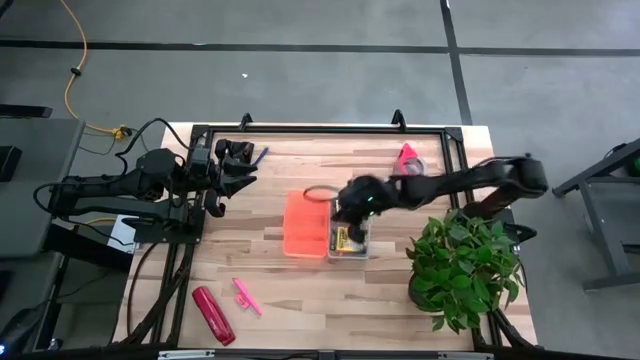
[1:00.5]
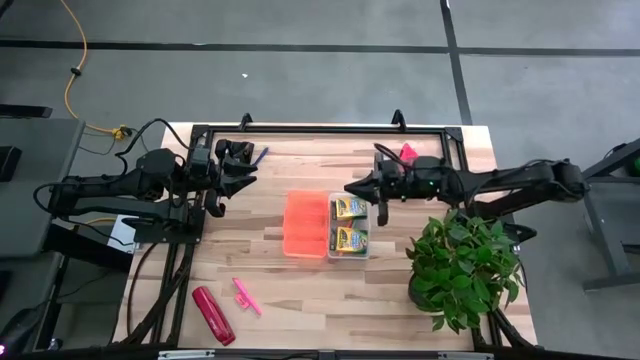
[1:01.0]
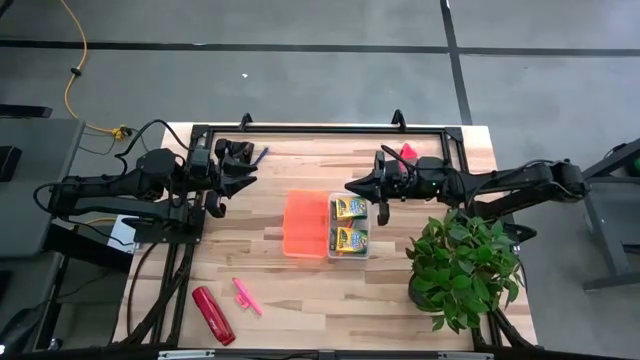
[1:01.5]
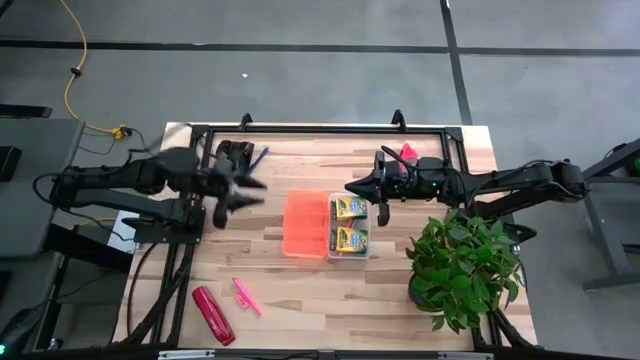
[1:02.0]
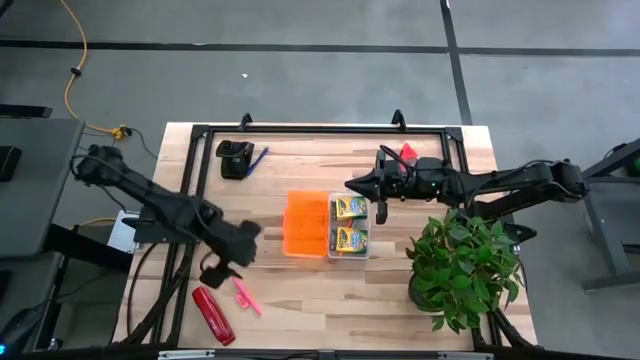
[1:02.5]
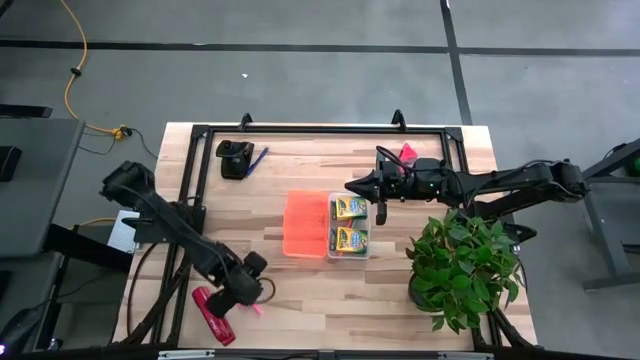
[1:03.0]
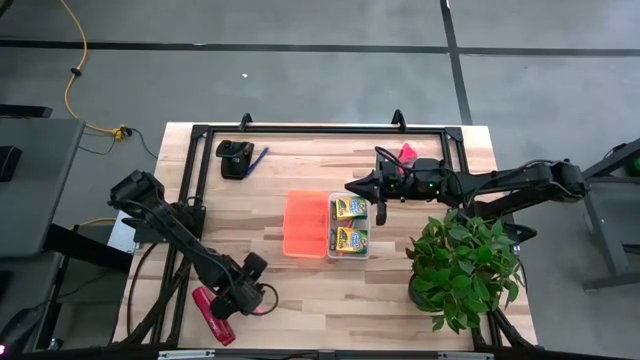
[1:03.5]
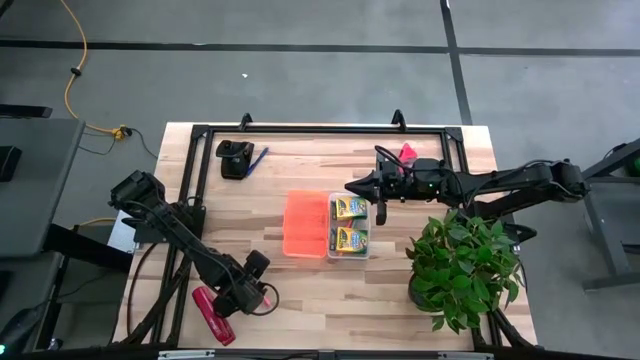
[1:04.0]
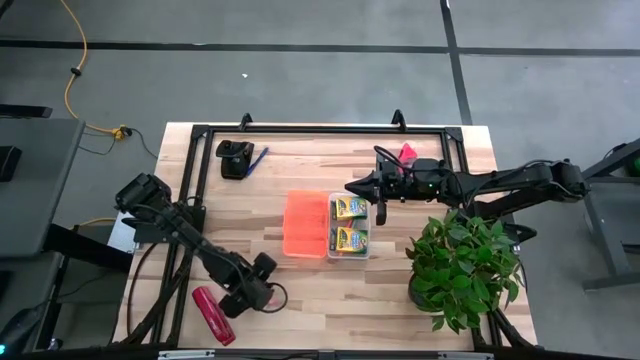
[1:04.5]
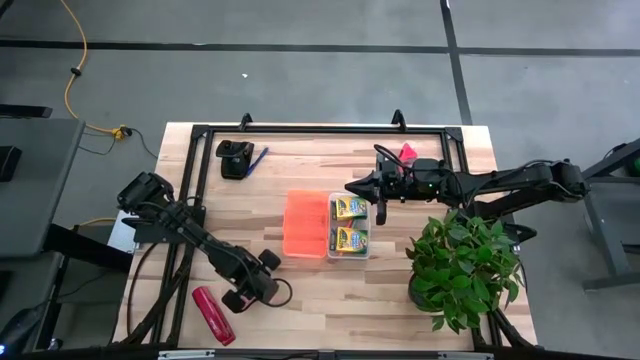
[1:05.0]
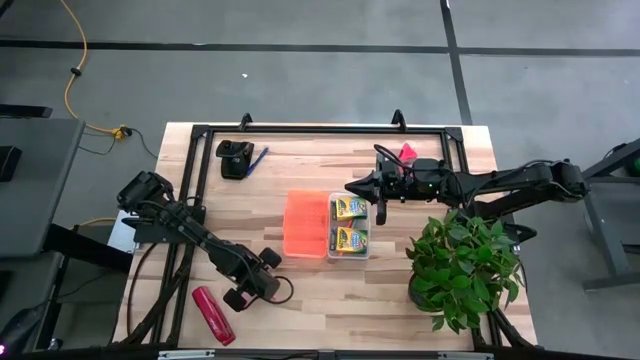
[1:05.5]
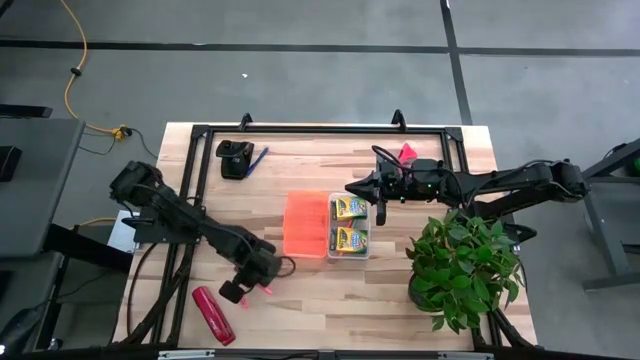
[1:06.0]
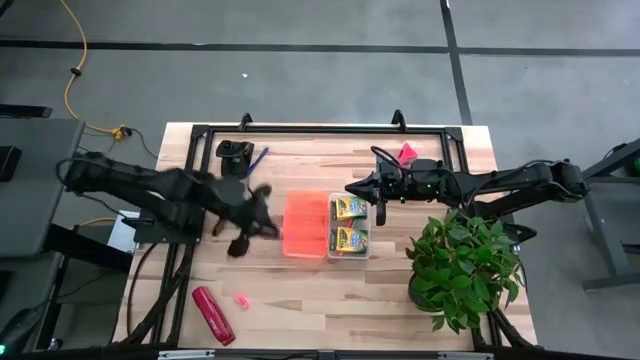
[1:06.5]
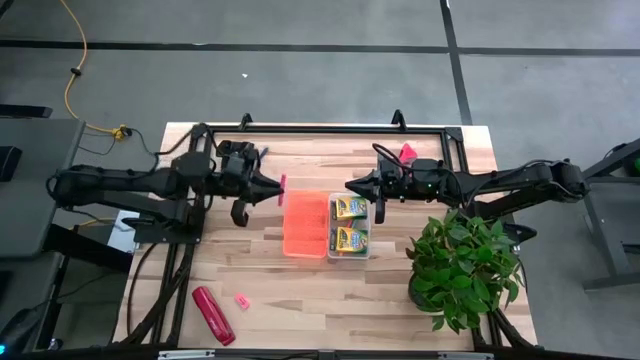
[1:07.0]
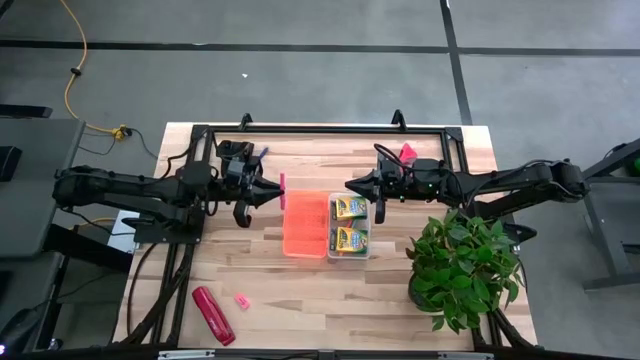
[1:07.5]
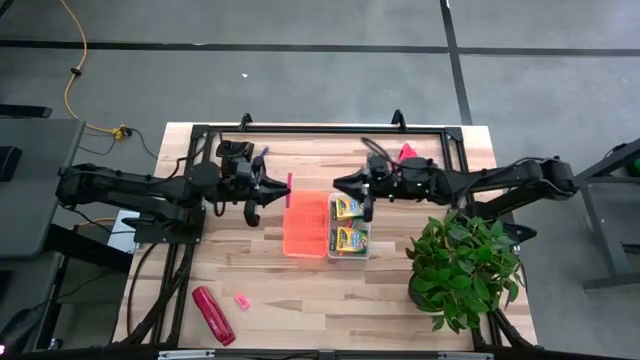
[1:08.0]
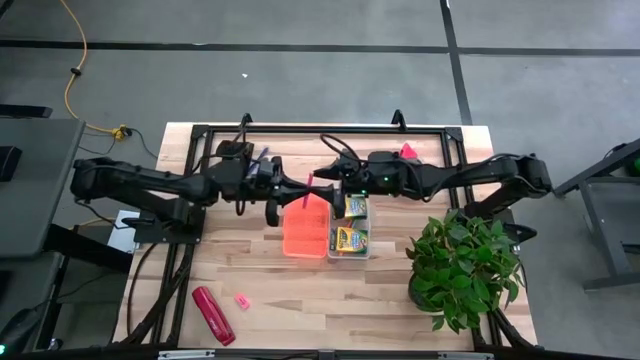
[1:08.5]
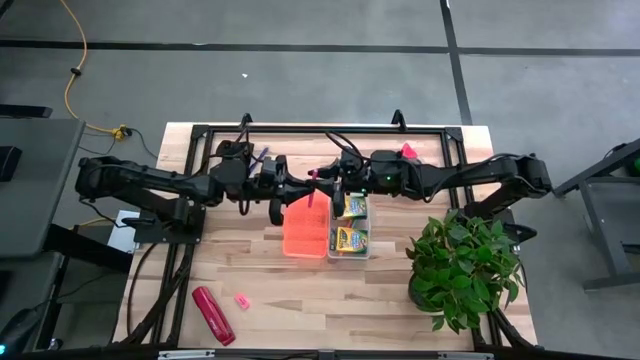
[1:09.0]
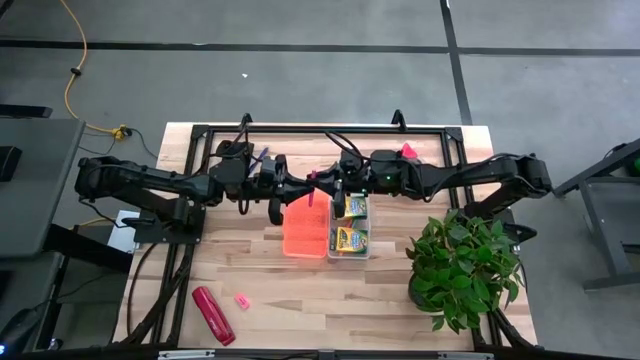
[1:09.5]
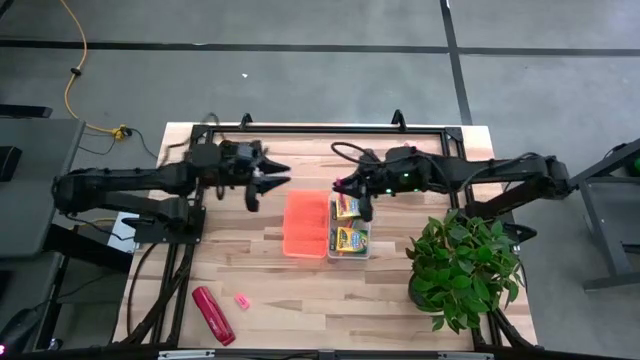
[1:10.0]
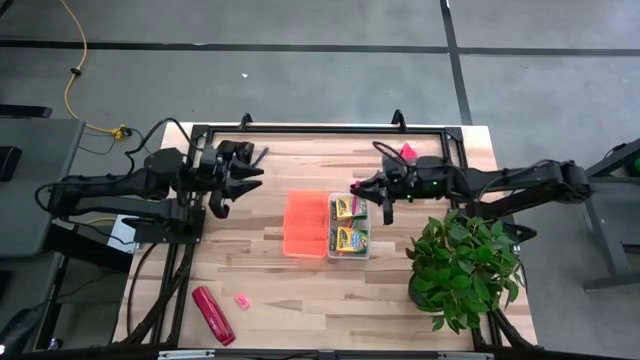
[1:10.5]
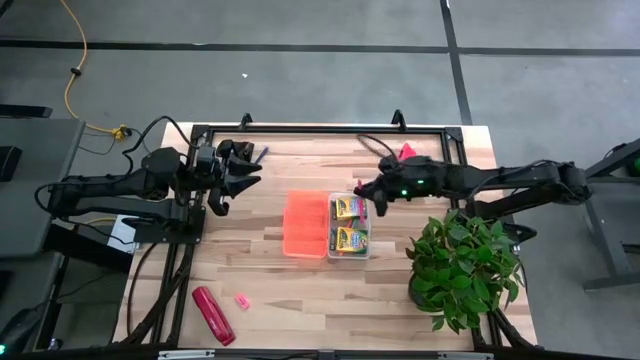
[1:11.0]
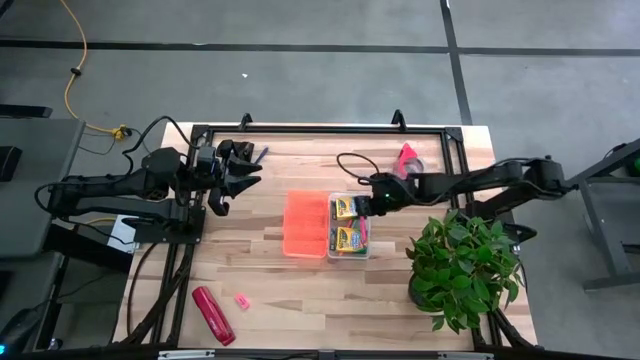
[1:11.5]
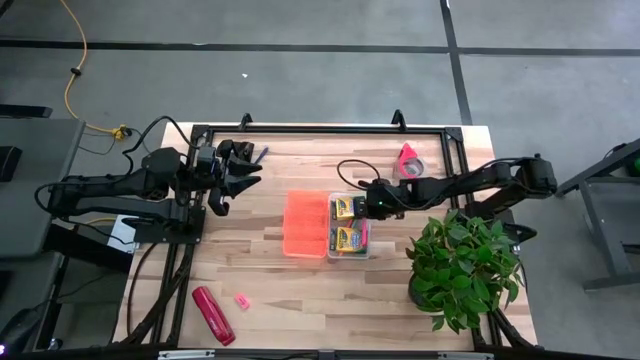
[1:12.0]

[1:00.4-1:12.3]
Task: Pack school essentials
Put the pink pen in the supply box

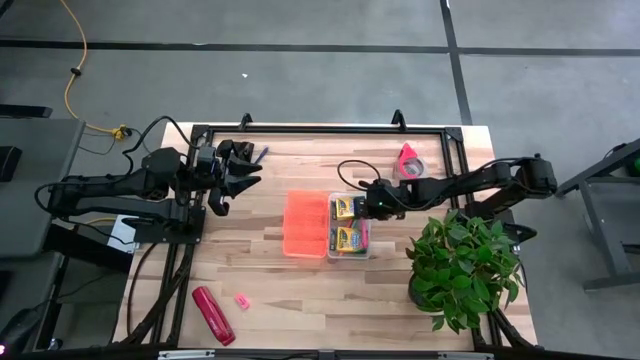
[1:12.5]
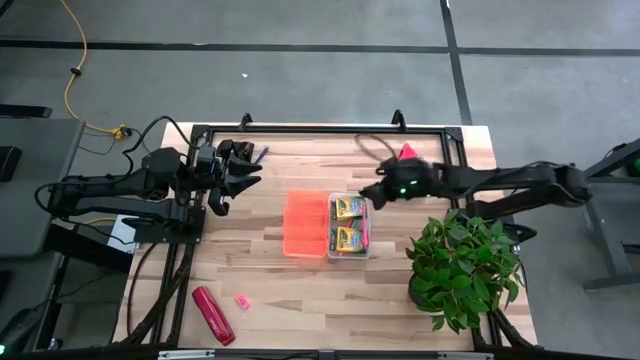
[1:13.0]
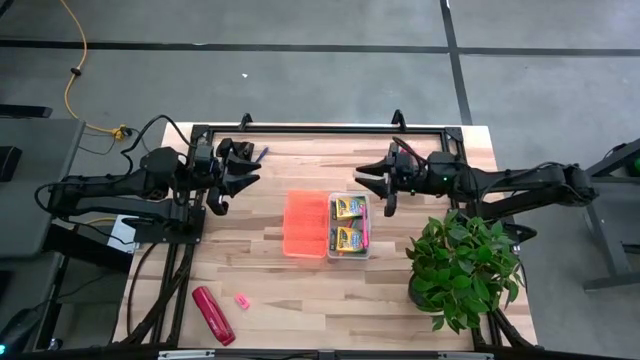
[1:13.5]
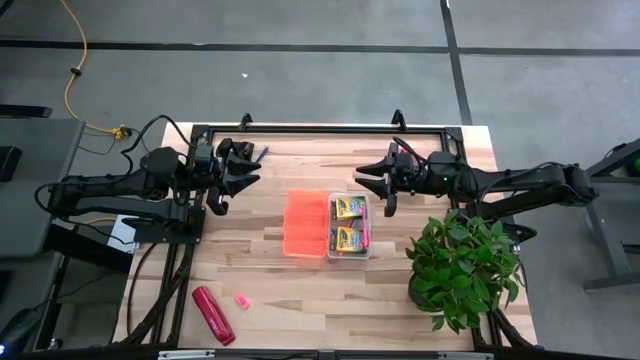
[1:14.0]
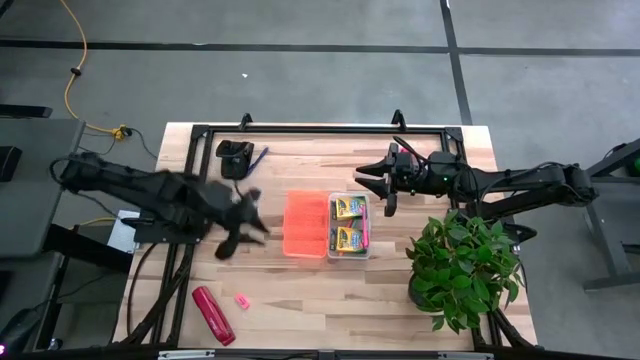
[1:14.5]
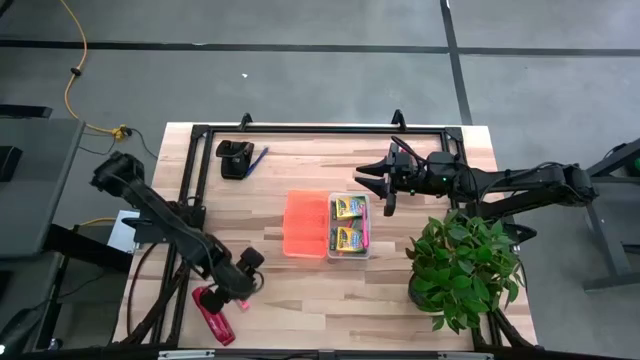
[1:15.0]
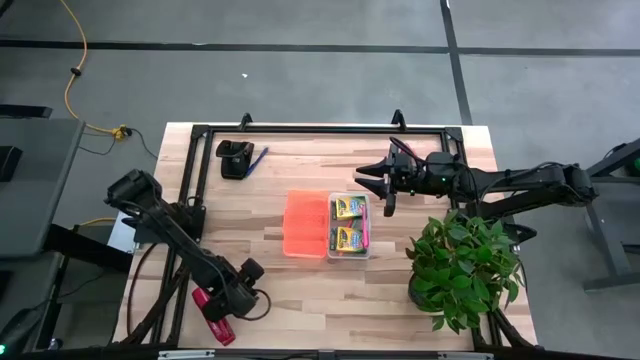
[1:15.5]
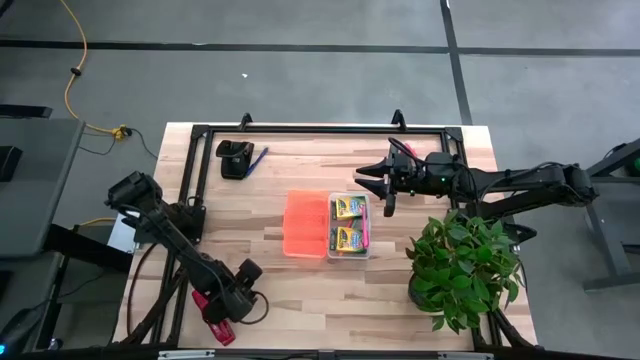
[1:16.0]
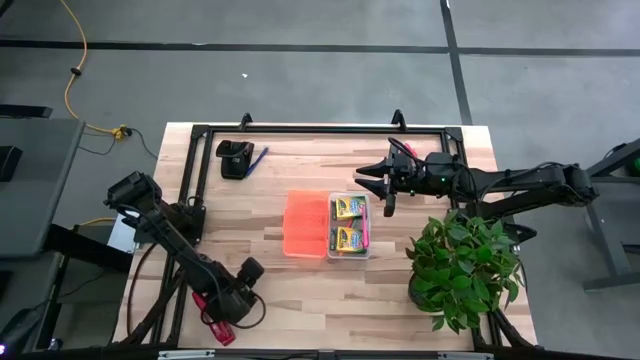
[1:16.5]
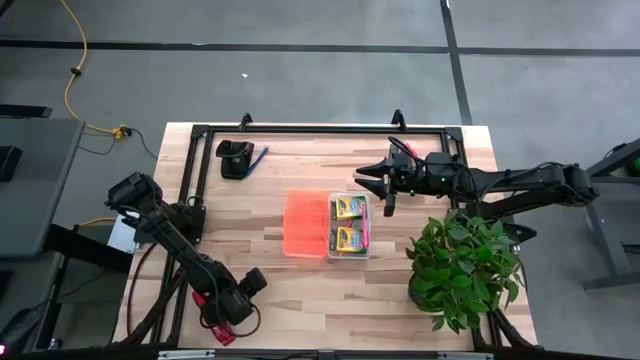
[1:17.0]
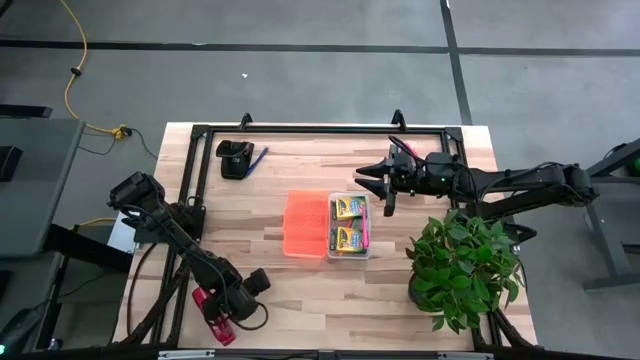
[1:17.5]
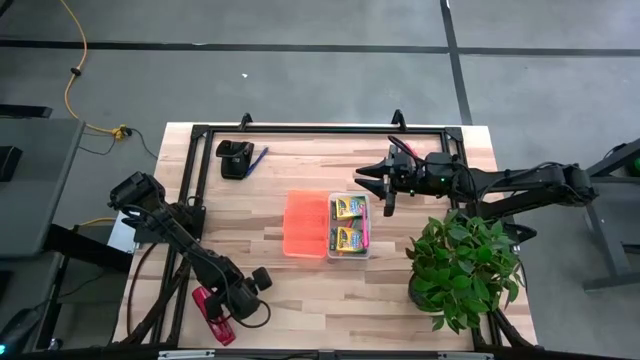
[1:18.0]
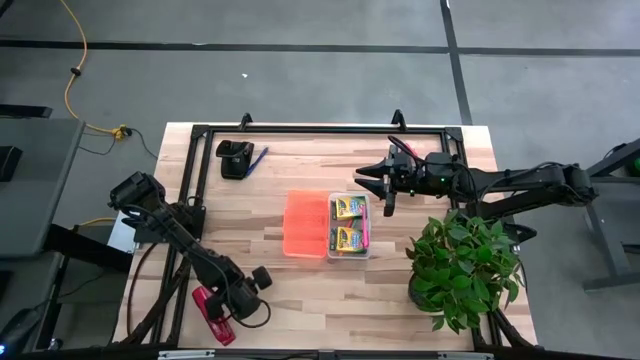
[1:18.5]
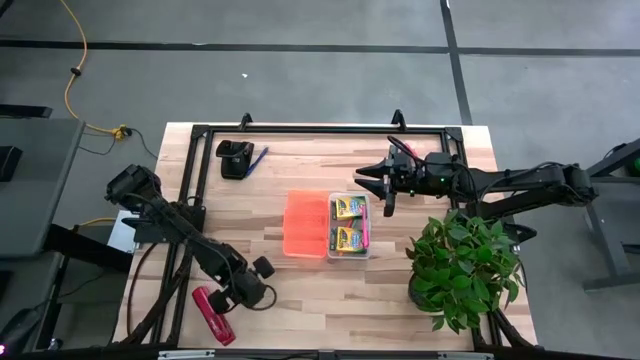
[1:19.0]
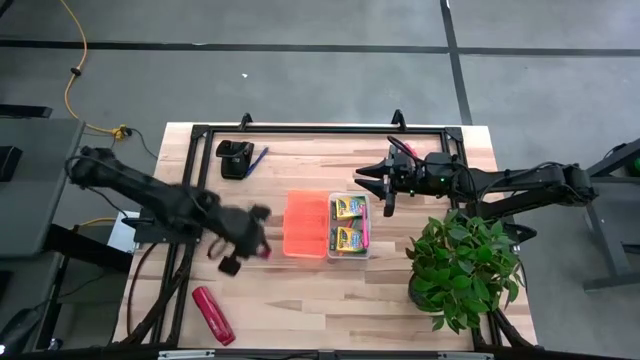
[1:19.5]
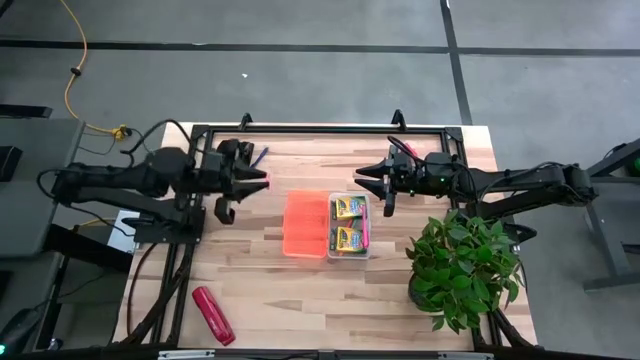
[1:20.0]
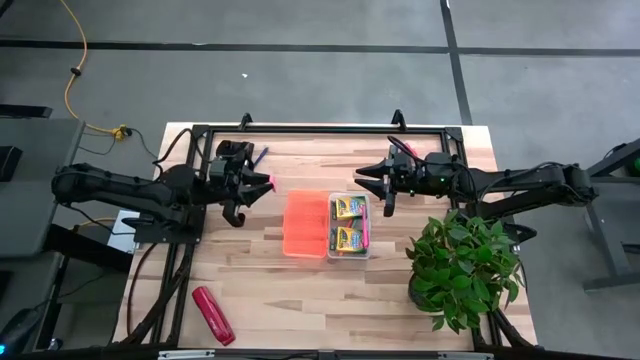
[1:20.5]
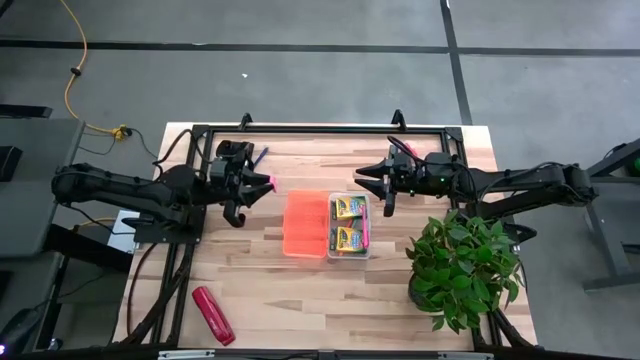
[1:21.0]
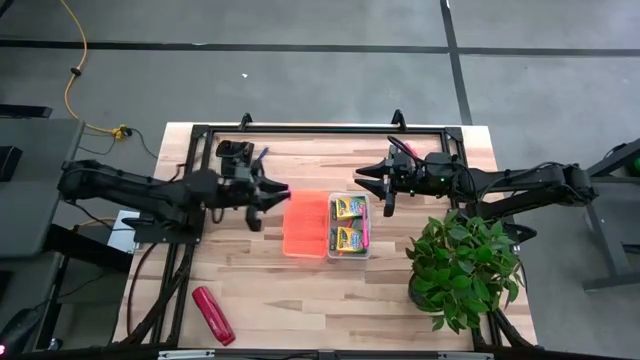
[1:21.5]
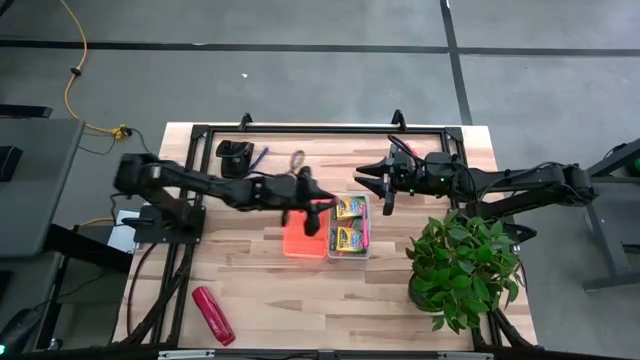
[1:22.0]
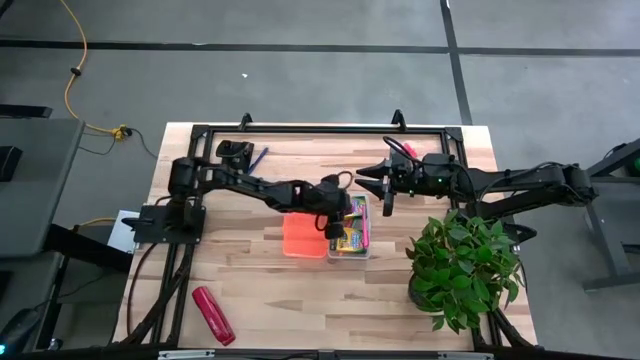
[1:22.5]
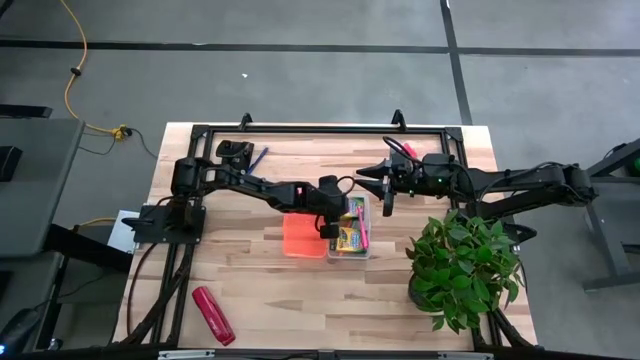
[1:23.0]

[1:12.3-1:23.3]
Put the pink eraser in the supply box
